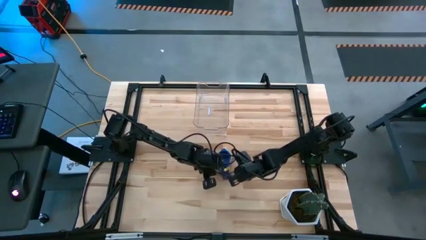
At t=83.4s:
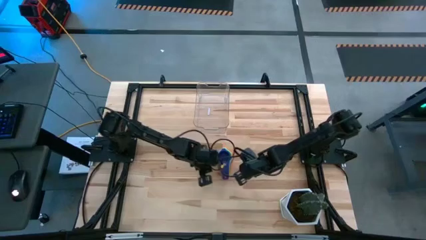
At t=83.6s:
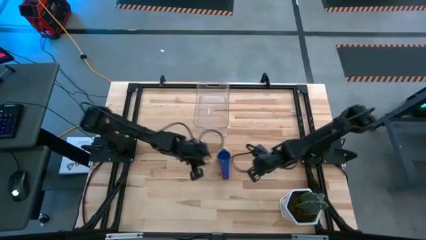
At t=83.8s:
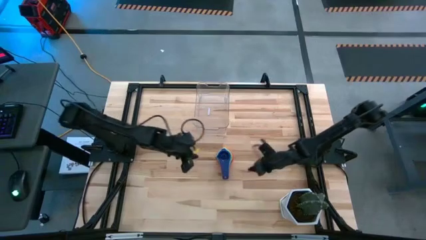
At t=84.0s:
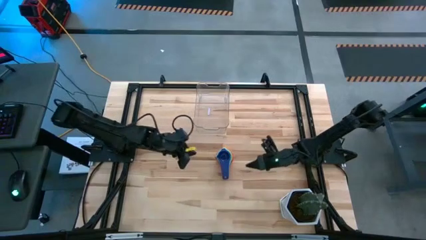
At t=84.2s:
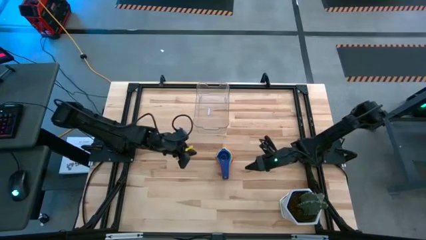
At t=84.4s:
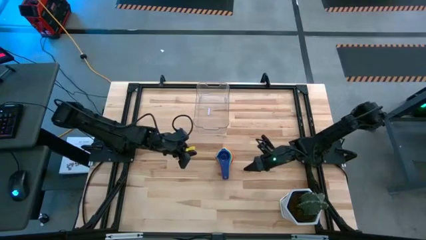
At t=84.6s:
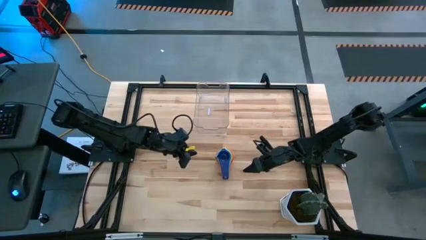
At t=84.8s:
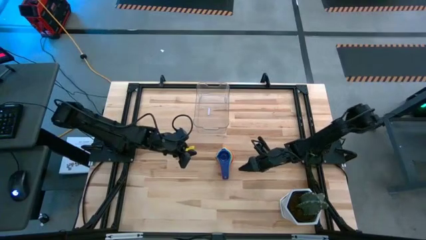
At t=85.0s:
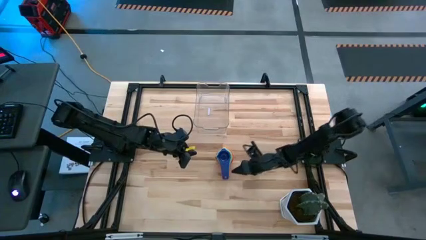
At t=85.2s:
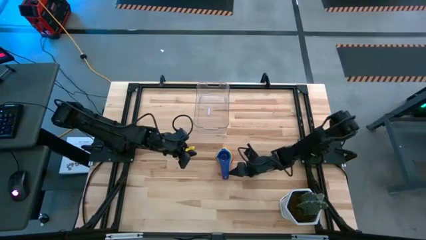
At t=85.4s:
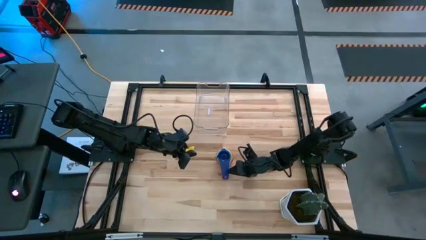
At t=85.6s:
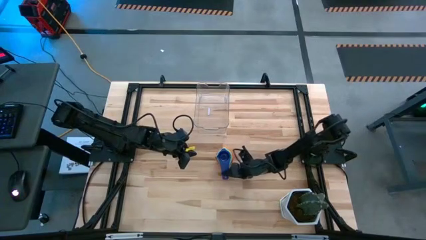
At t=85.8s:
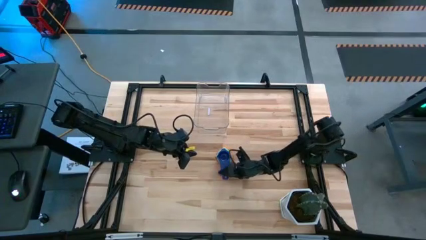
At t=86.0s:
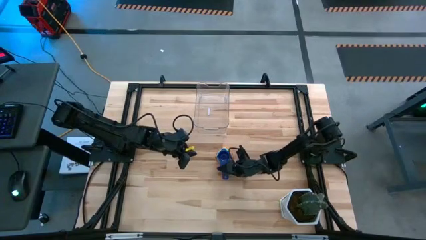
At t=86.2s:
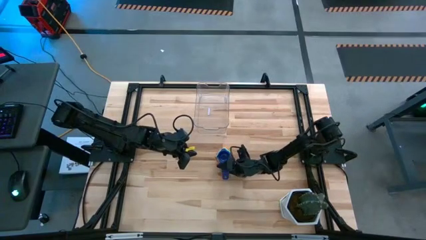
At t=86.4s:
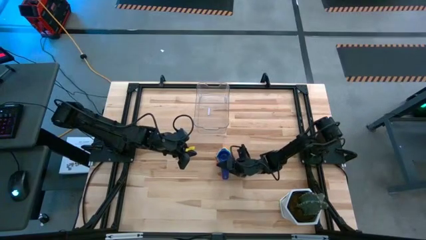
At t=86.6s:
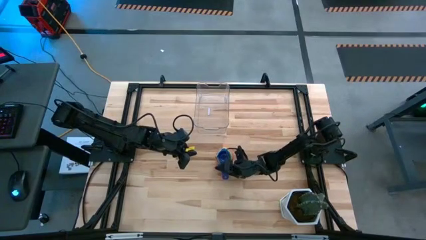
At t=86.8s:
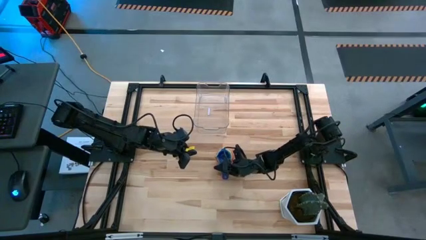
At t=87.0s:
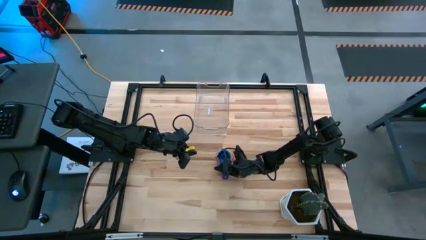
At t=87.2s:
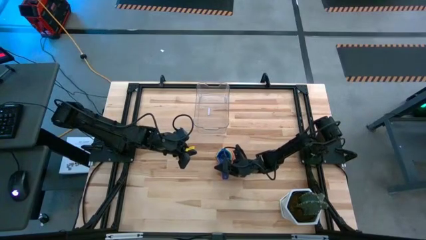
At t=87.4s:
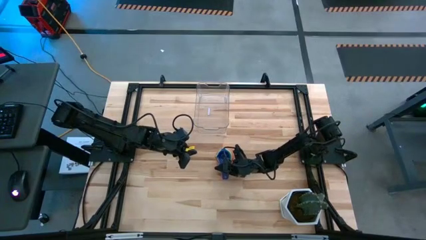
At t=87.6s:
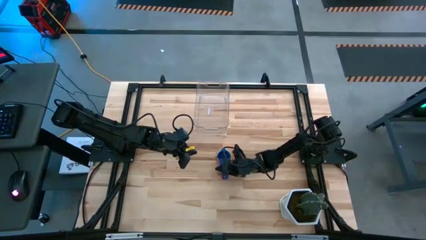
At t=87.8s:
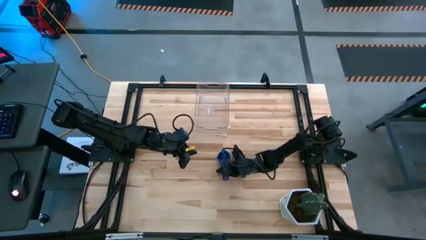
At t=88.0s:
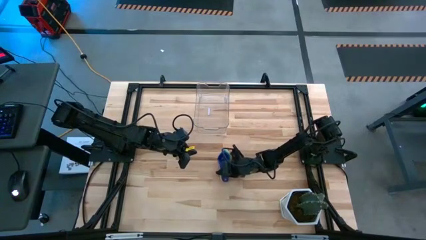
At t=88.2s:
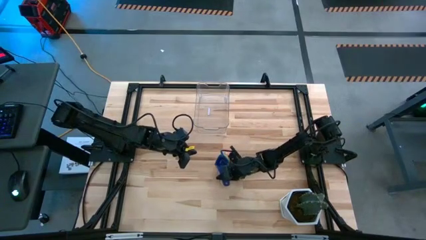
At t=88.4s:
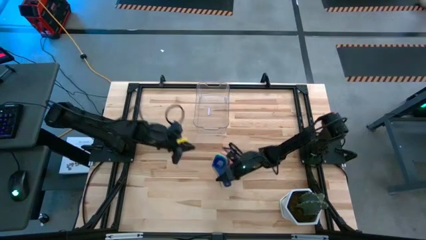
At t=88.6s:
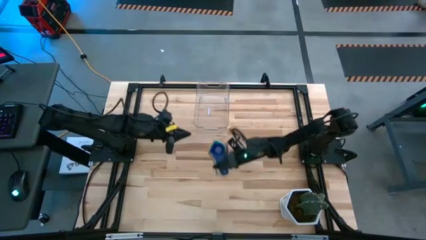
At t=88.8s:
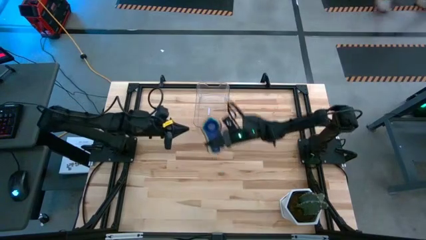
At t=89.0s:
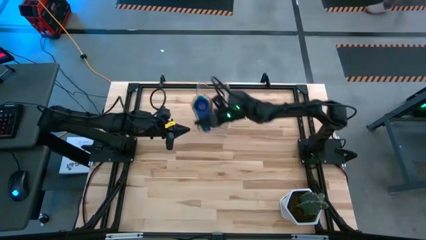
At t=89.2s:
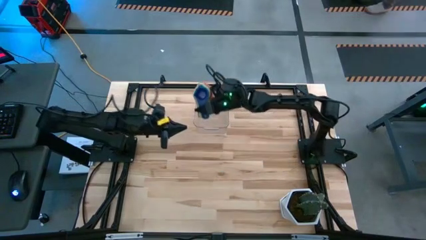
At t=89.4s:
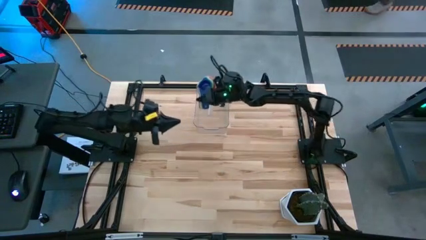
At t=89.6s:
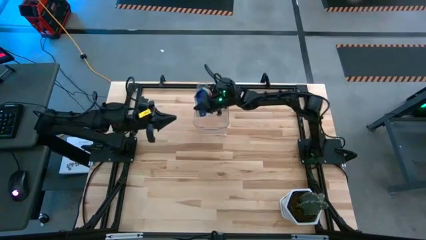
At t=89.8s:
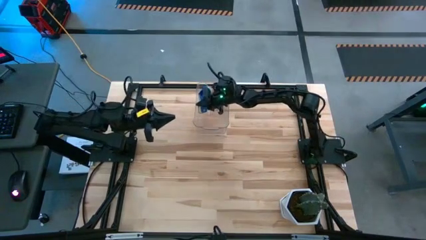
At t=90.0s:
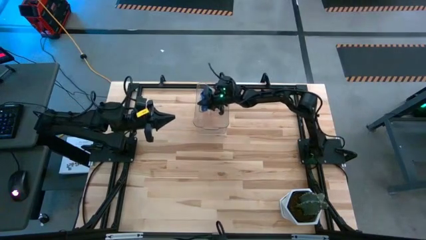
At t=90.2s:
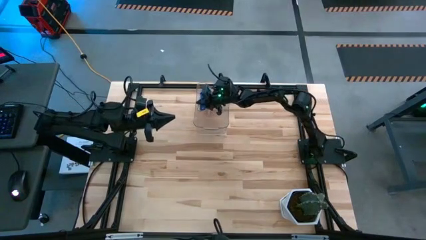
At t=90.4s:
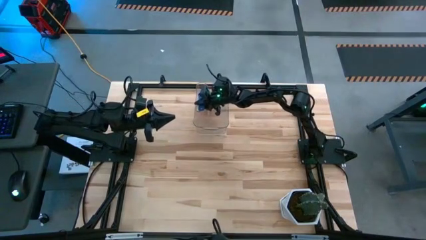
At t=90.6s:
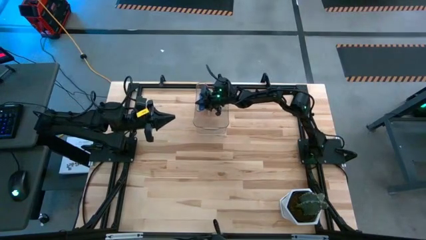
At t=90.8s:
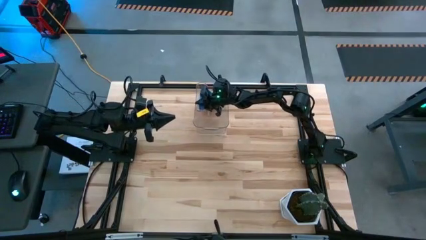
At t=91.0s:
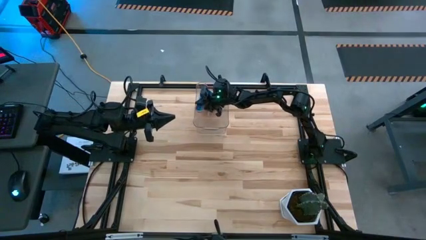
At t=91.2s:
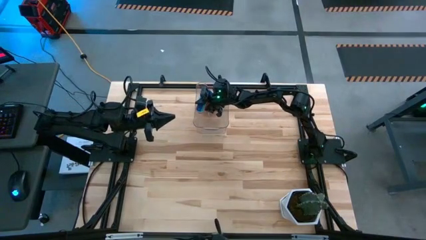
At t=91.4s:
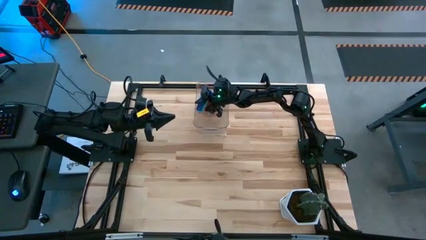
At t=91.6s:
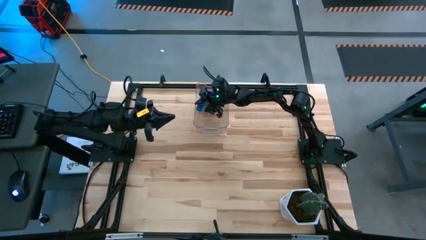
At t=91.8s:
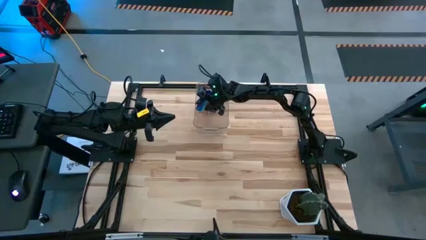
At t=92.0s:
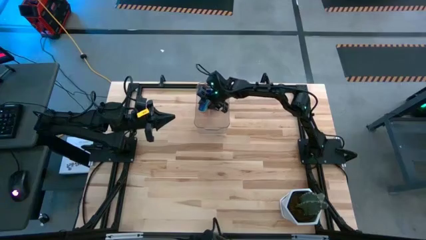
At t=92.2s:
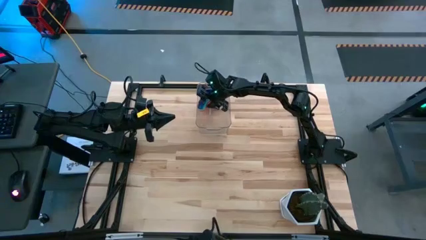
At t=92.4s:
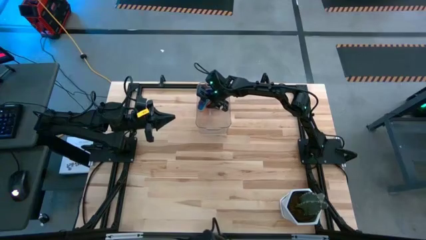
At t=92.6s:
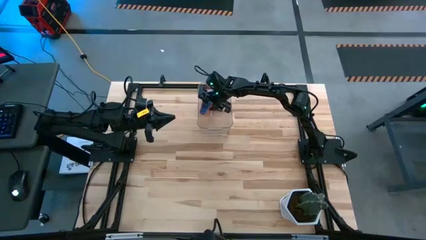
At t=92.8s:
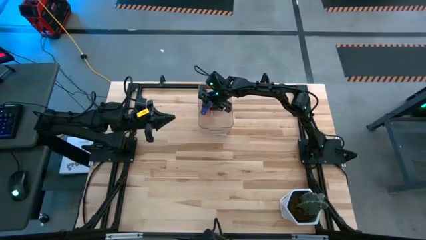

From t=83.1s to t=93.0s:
Task: Nest measuring cups in basket
Put the nested measuring cups into the transparent bin

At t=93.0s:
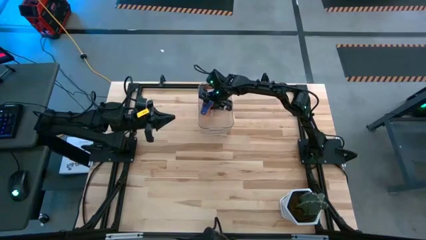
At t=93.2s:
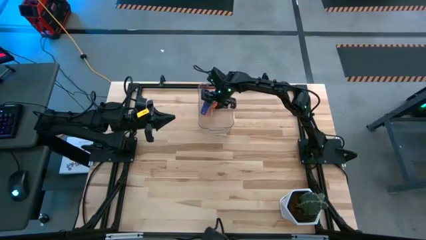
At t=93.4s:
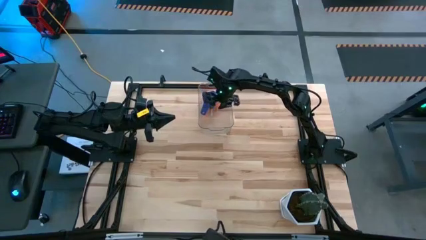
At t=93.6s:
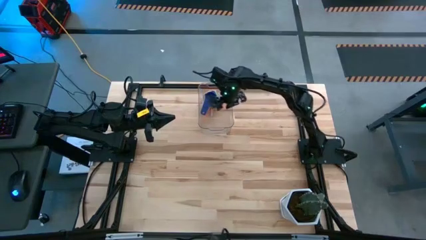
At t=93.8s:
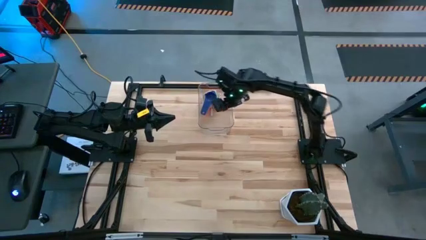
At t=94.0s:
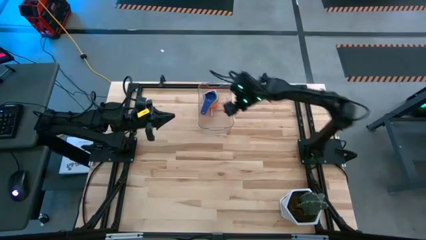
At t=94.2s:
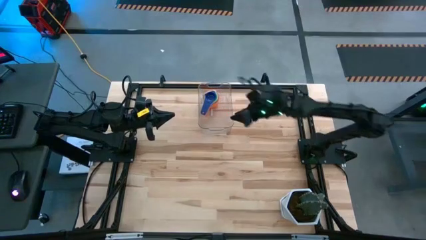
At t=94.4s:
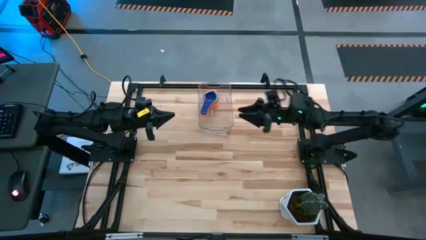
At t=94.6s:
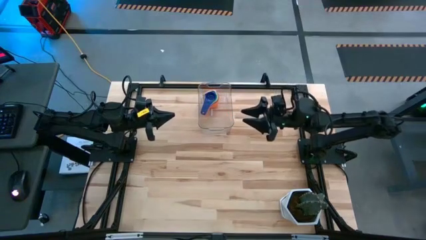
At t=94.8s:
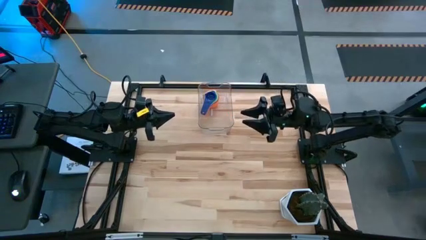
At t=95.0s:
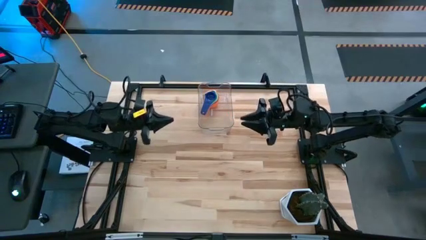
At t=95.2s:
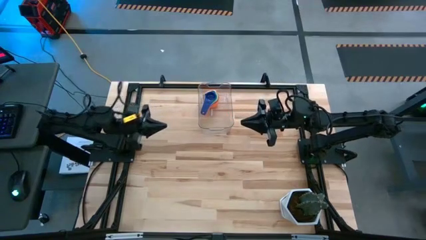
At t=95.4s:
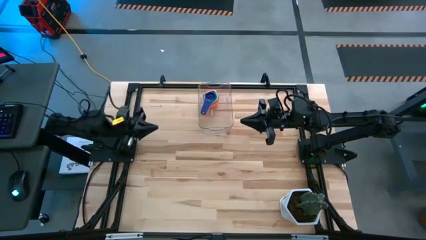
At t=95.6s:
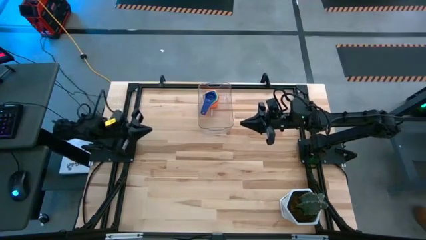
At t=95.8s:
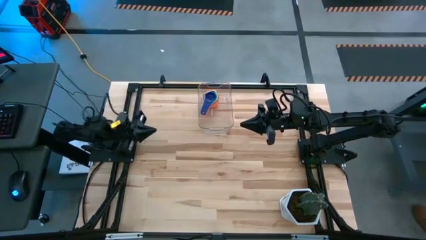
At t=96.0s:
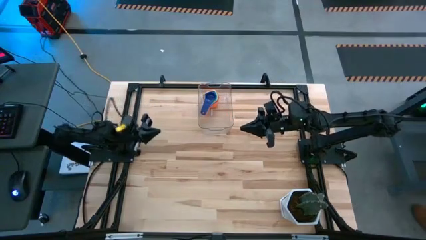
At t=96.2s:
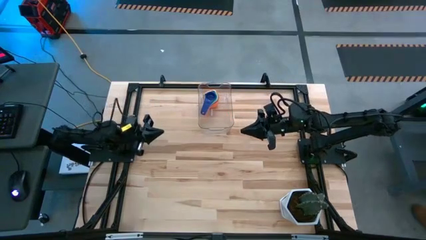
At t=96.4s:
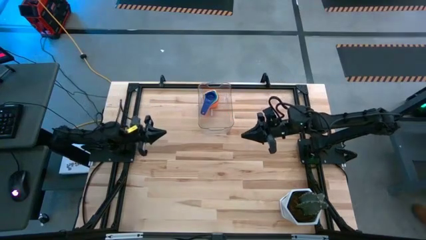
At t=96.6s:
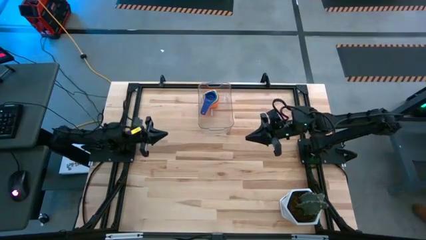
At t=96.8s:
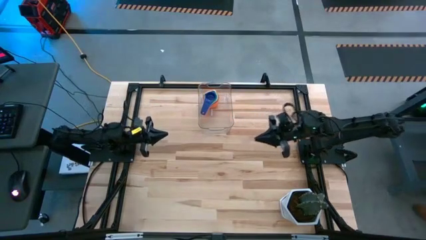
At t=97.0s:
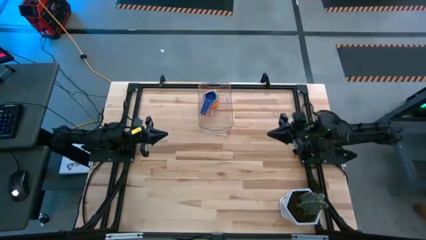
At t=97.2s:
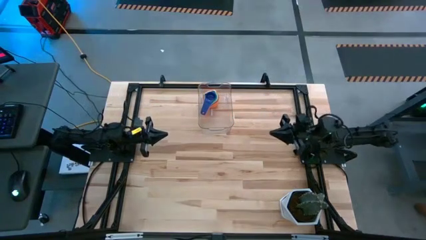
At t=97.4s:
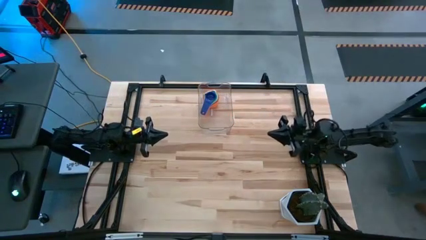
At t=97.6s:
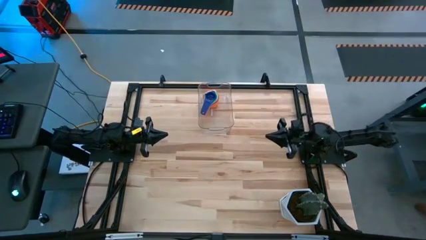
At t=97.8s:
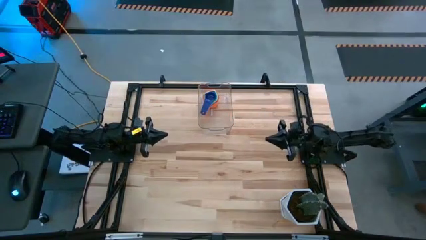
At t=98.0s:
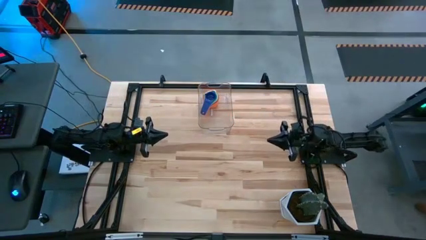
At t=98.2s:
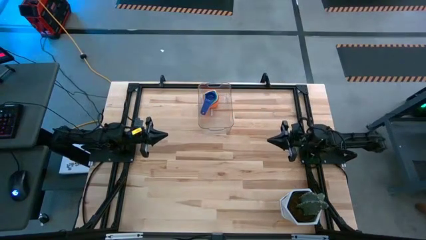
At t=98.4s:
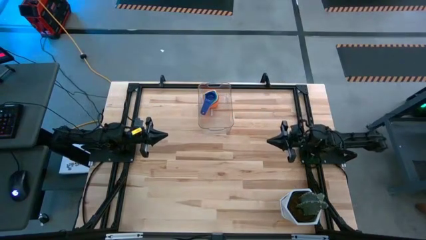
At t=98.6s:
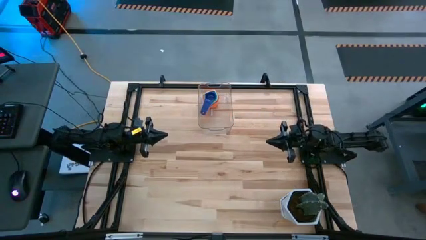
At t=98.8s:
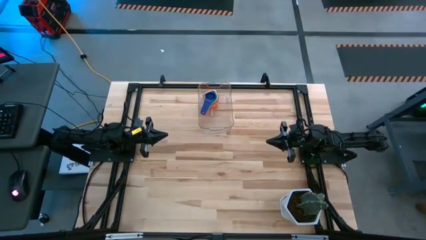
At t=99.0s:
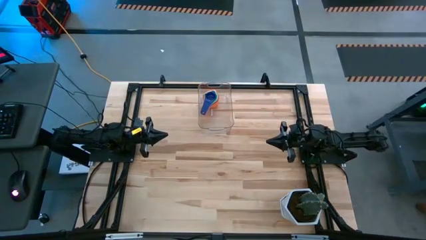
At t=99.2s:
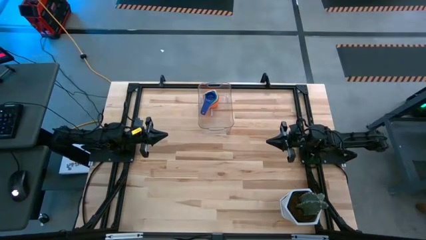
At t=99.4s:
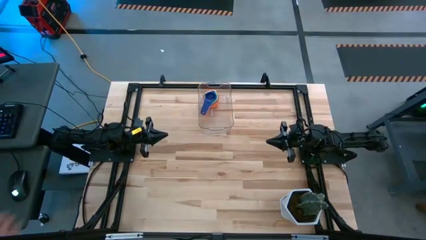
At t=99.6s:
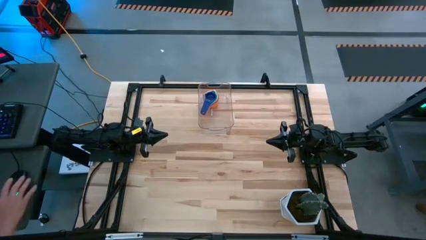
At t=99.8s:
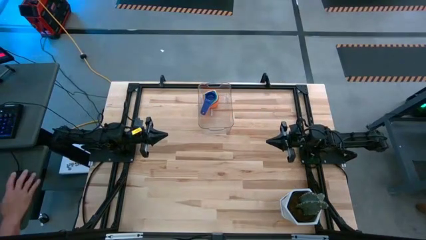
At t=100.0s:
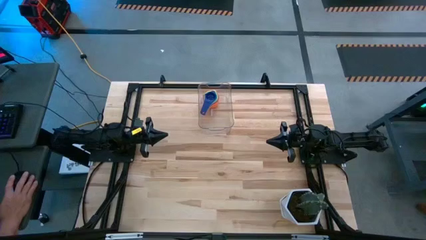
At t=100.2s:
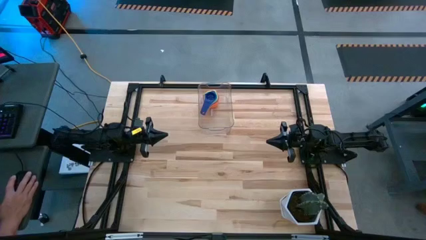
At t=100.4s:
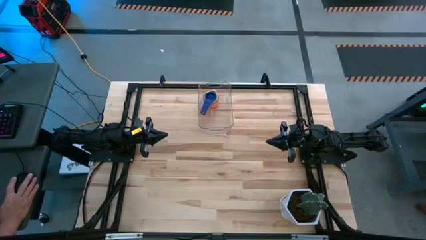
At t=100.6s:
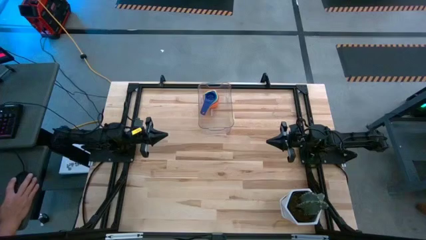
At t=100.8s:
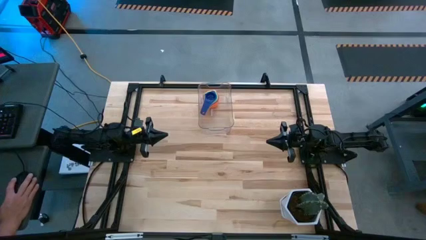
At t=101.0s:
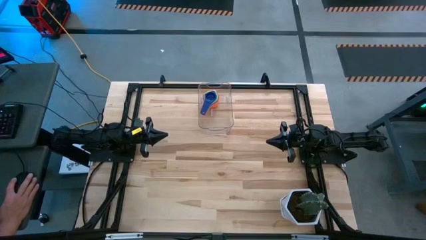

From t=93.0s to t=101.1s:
Return to Home Position
